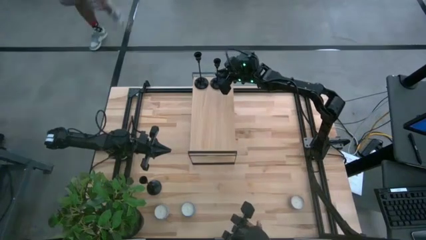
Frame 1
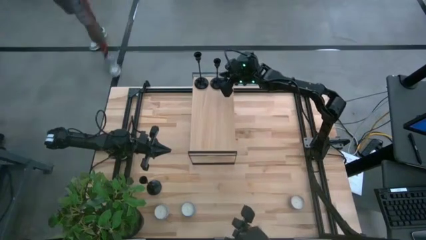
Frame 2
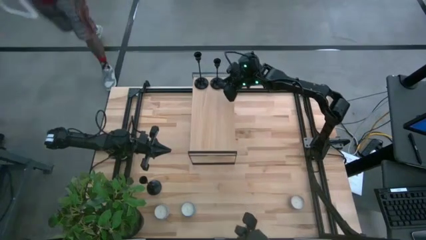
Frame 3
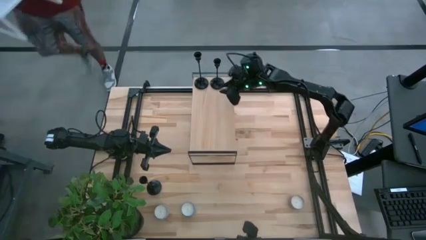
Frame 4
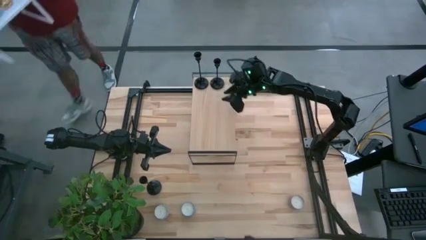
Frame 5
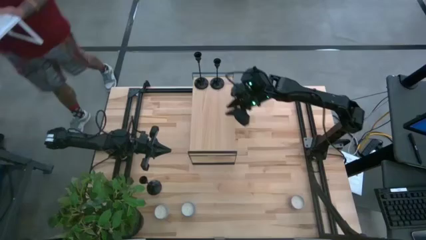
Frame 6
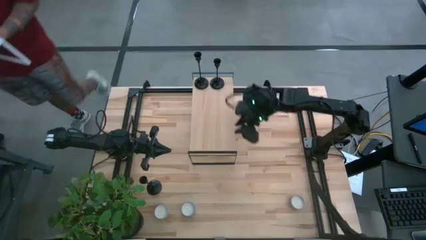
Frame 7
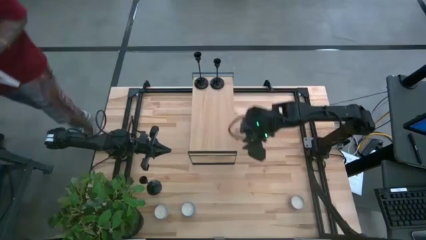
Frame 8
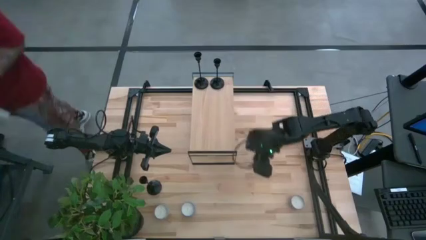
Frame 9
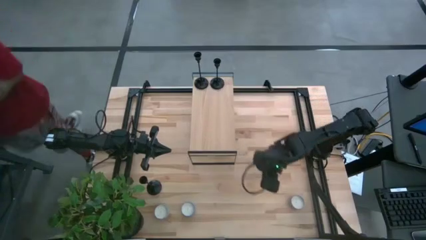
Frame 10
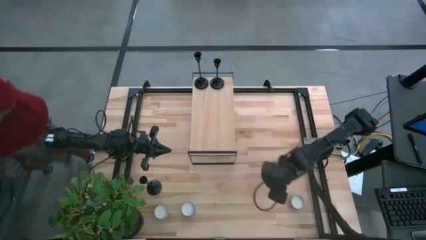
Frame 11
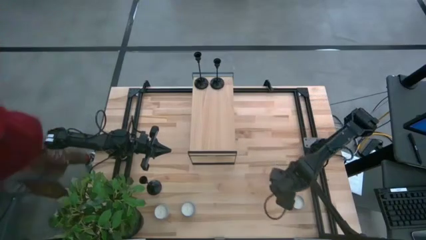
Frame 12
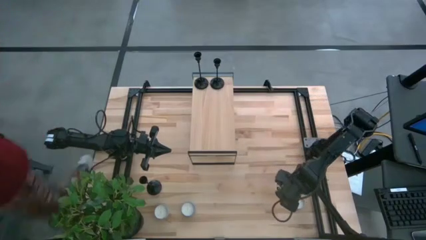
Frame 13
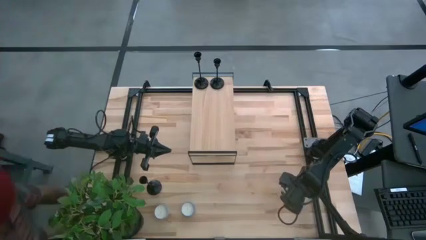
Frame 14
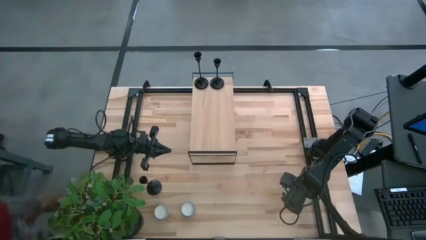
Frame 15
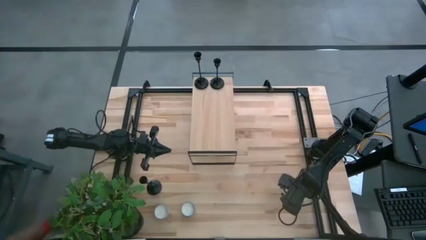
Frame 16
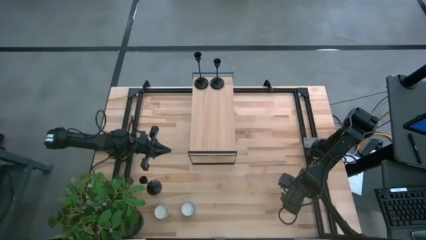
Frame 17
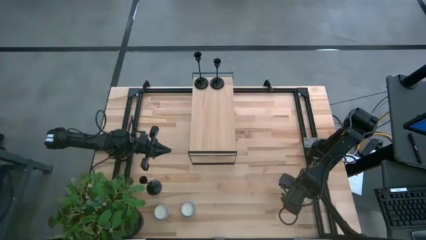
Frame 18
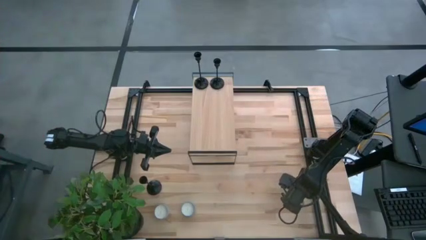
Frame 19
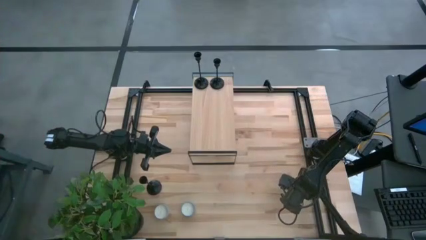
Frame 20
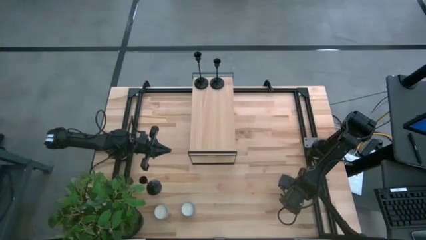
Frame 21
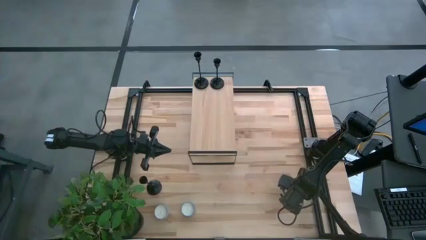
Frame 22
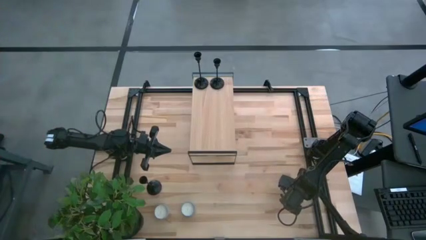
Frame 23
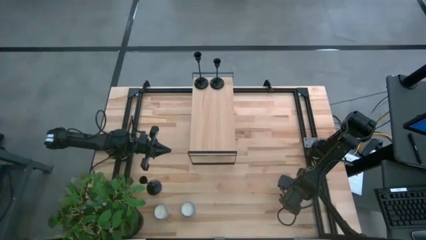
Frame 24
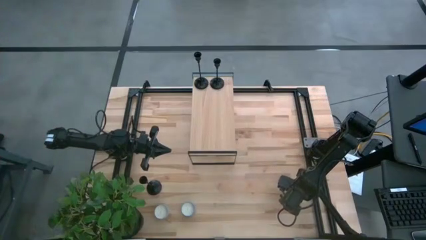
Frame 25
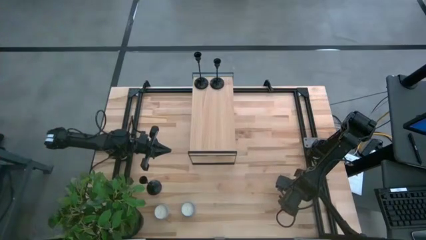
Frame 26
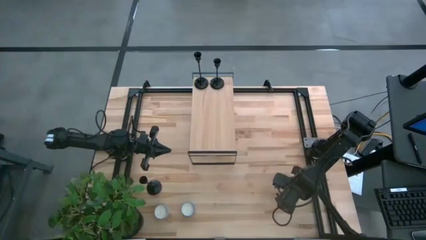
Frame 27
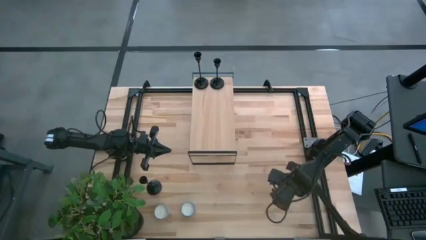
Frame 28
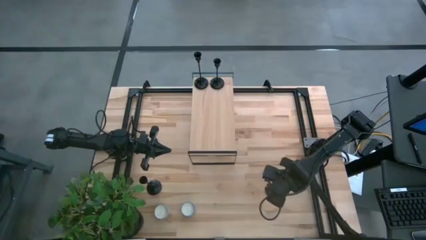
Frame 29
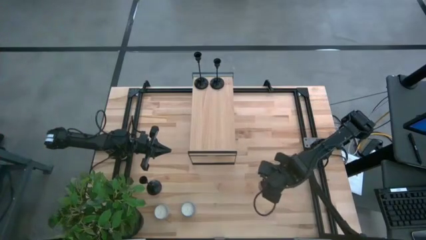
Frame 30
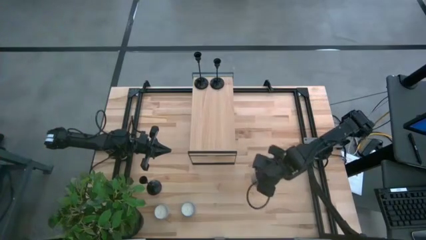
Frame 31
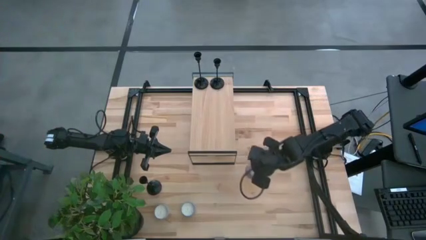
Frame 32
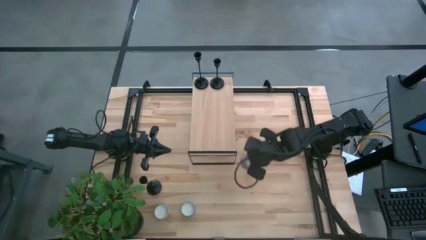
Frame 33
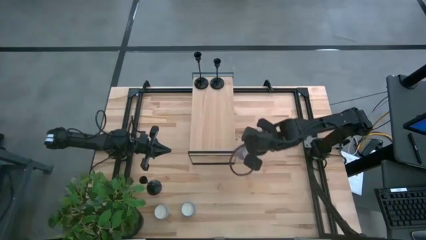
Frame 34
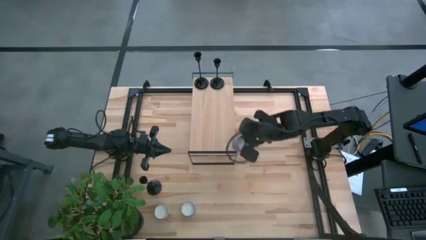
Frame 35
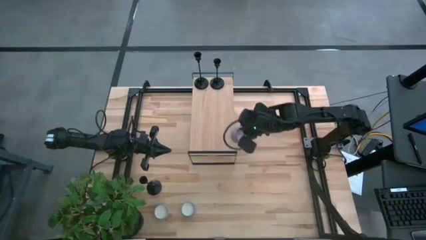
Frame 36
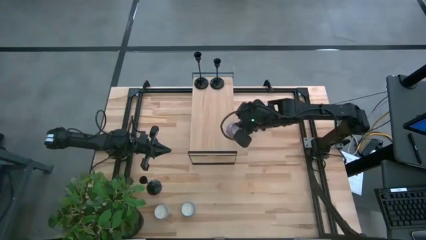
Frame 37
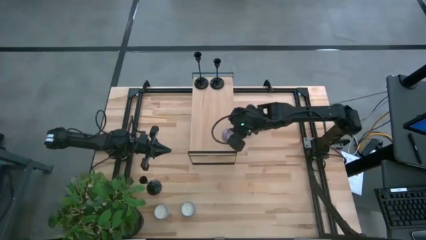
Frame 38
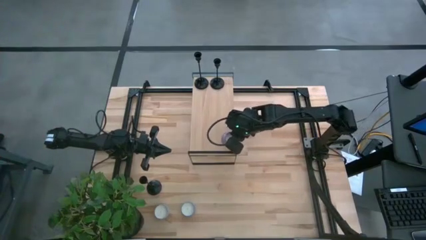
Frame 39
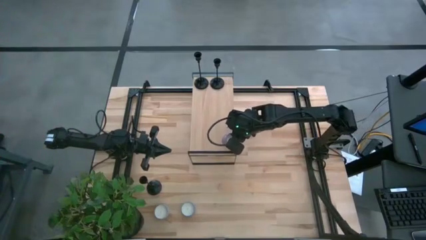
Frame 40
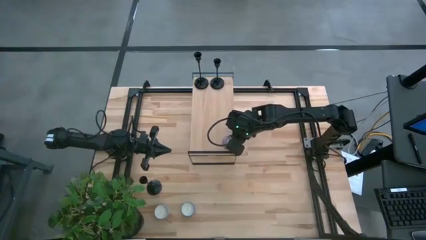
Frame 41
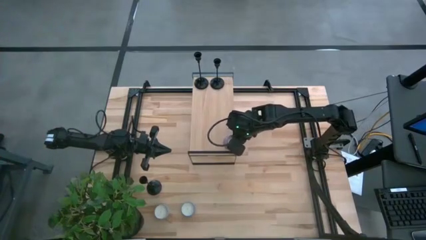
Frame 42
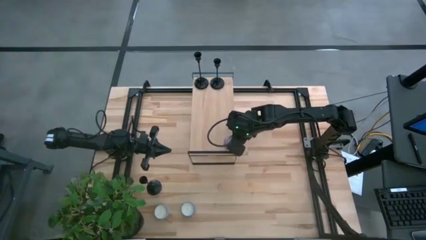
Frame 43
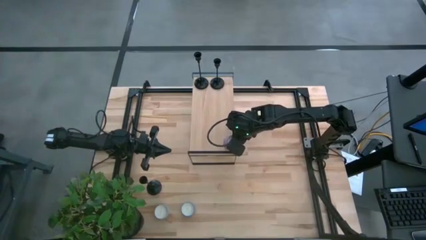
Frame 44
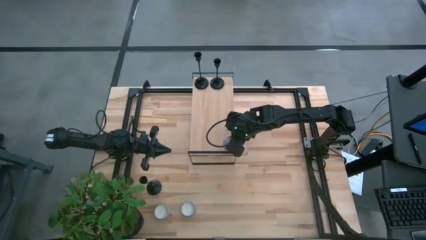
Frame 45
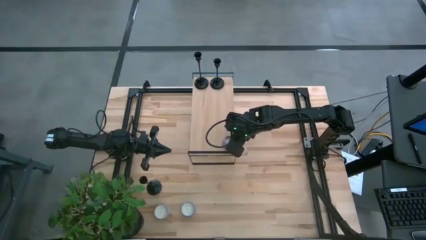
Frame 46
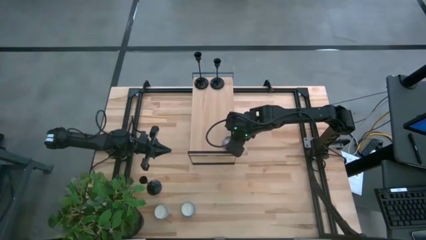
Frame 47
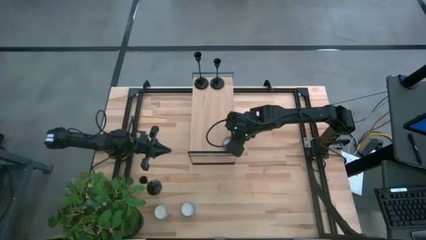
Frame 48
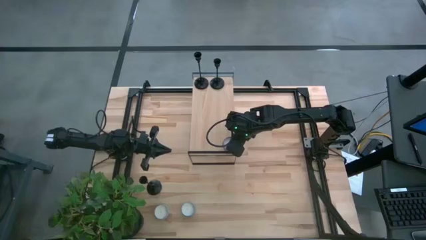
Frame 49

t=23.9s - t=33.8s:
Task: Pick & Place candle stick holders
Put the pink scented candle on the shelf

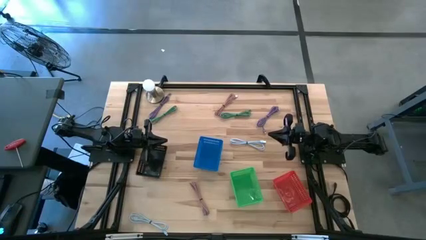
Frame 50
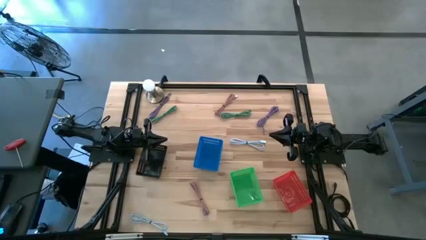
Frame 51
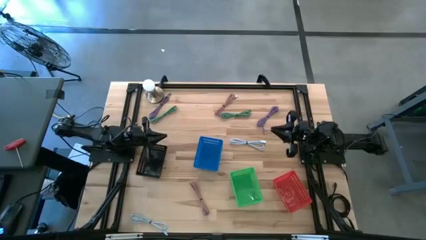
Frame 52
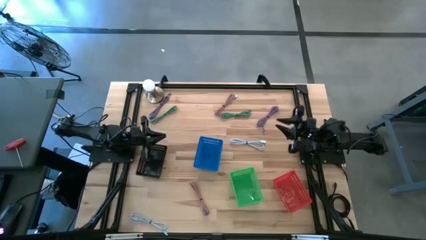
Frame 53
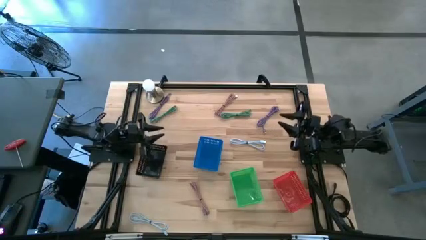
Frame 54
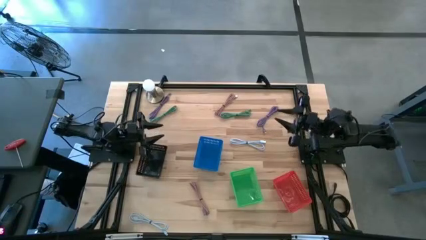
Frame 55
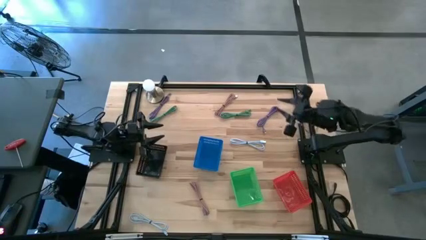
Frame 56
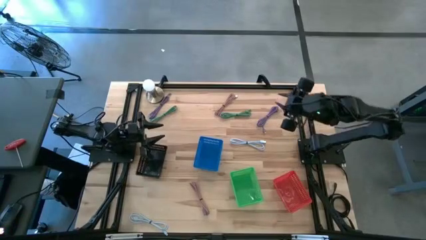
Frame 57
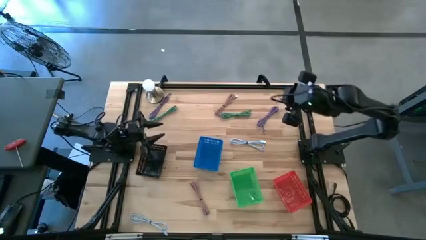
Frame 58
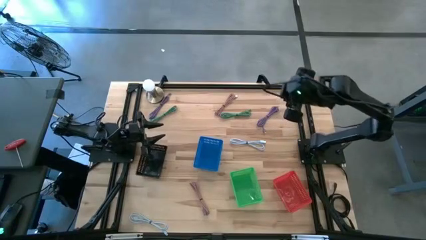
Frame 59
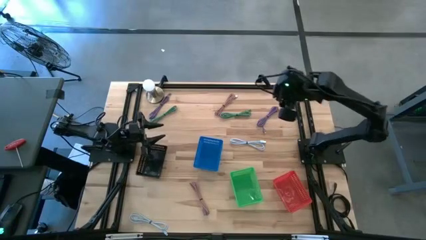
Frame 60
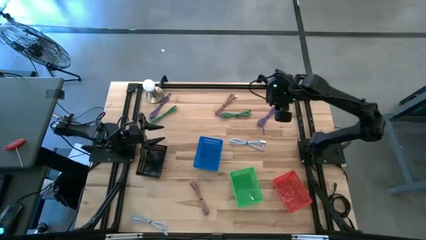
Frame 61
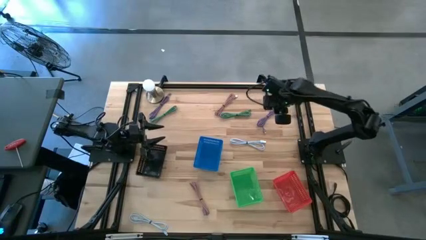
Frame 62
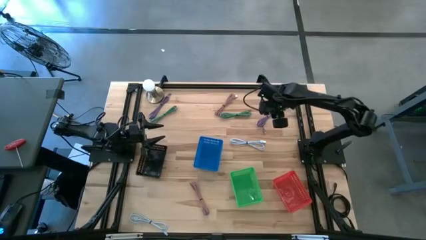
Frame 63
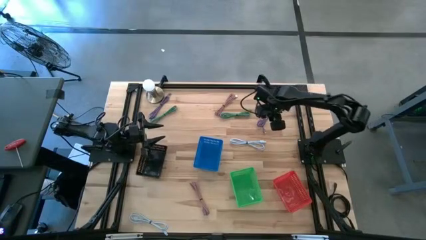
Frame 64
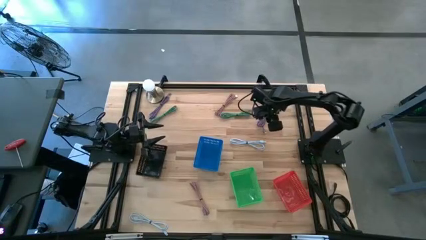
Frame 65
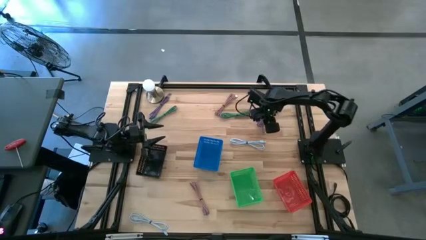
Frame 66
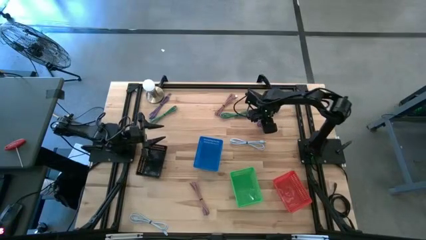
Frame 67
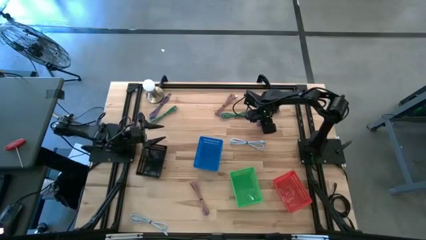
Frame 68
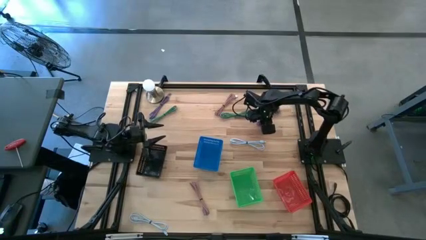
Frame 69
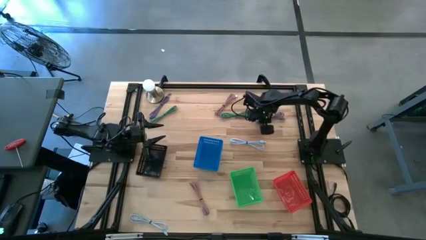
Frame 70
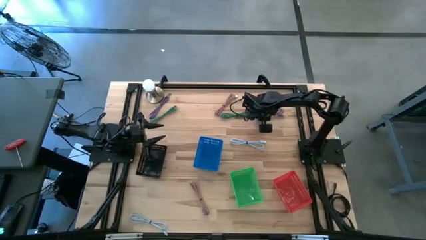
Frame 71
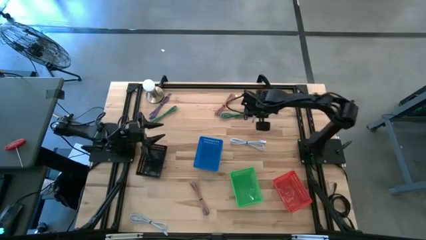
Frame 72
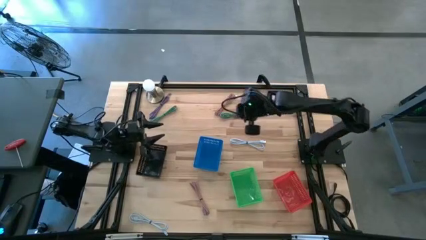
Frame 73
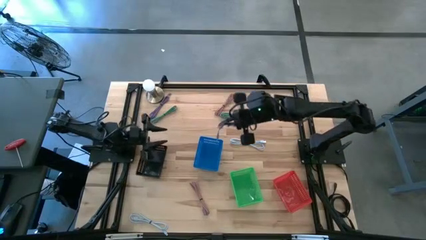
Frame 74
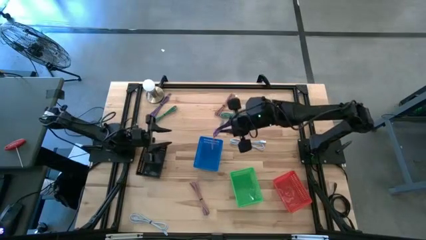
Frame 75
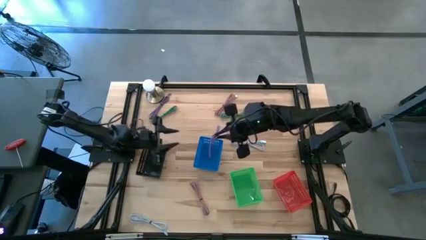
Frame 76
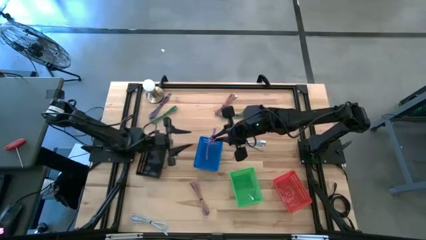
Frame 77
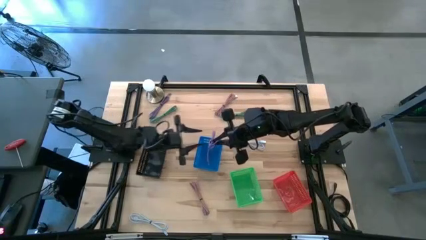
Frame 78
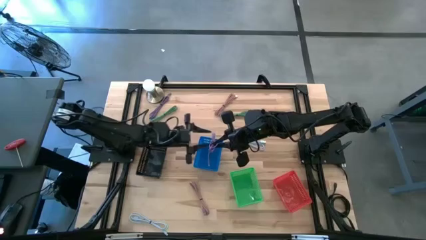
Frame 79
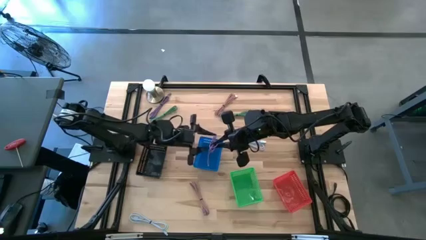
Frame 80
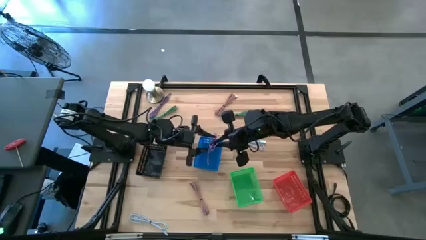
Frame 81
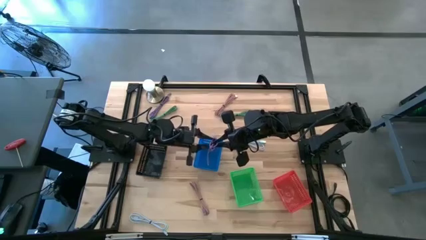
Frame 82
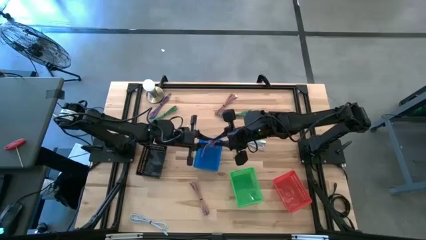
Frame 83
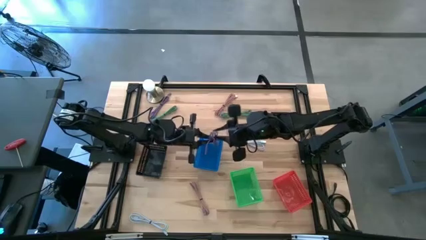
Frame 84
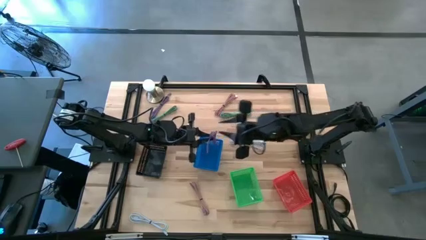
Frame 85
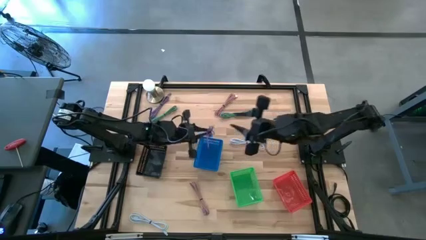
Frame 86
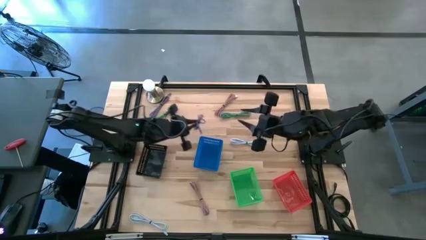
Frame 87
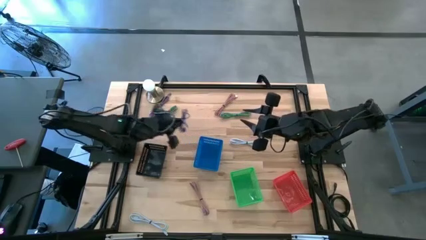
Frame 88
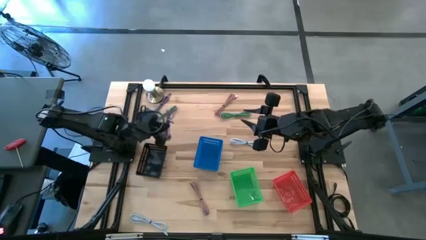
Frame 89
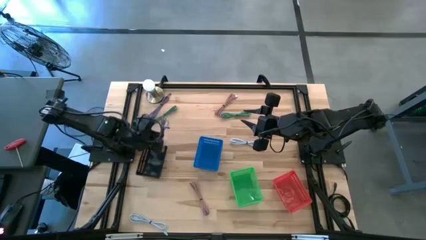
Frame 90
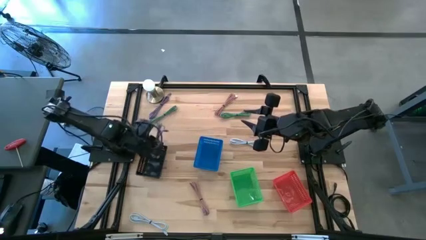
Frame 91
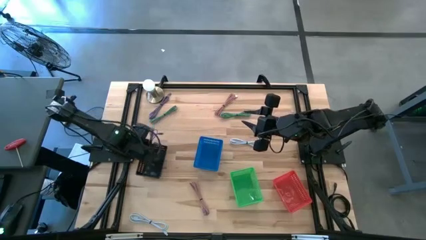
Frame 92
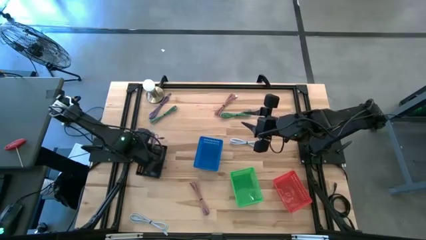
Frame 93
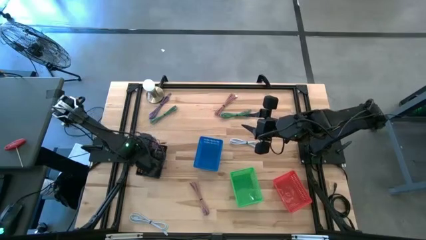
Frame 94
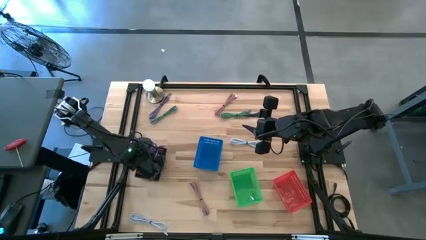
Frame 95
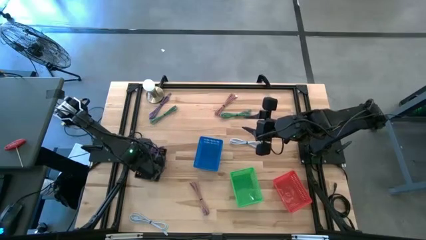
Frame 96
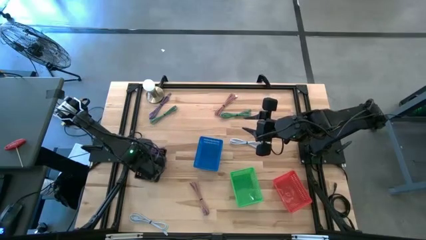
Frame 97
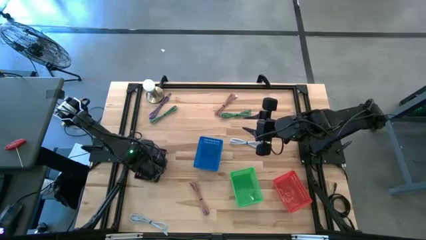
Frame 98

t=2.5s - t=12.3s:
Task: Pick & Place USB Port
Put the right blue USB cable into the black bin
